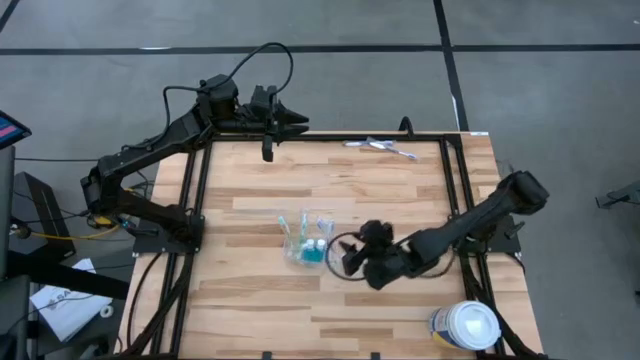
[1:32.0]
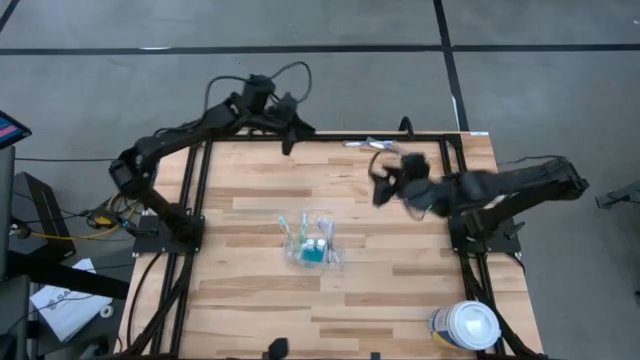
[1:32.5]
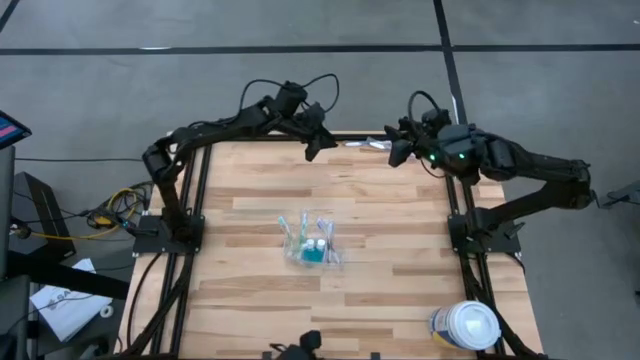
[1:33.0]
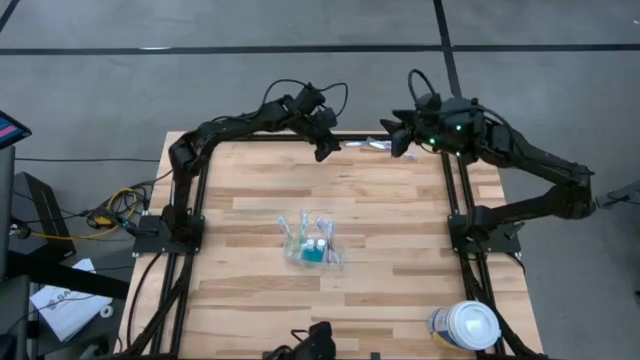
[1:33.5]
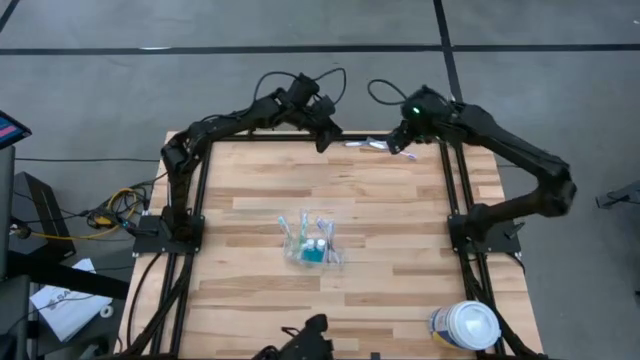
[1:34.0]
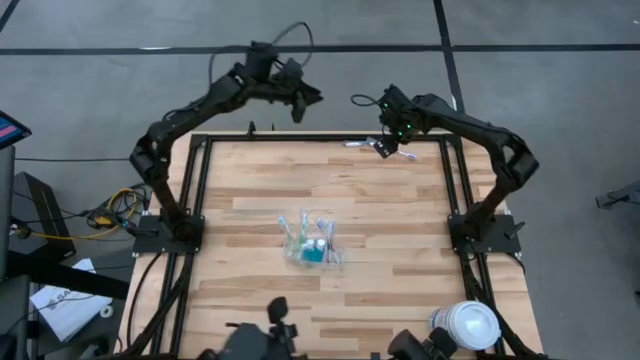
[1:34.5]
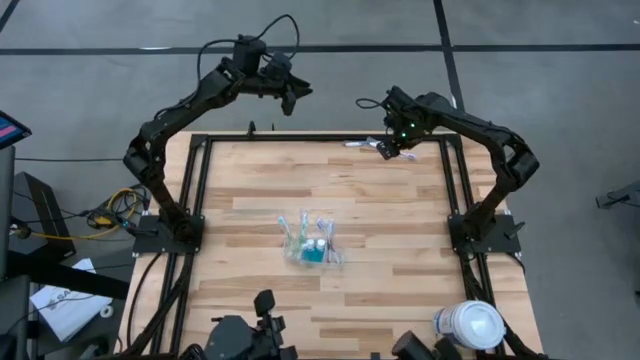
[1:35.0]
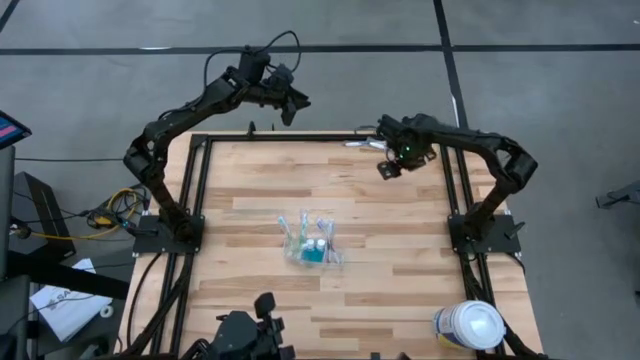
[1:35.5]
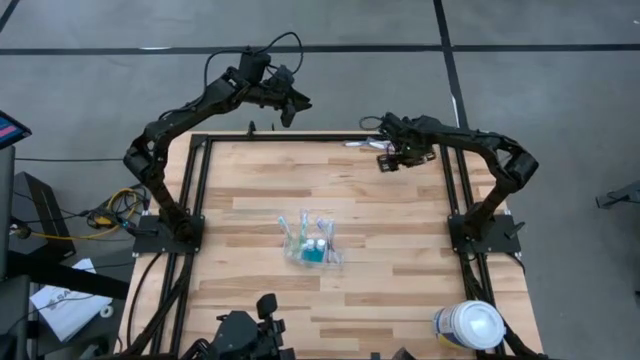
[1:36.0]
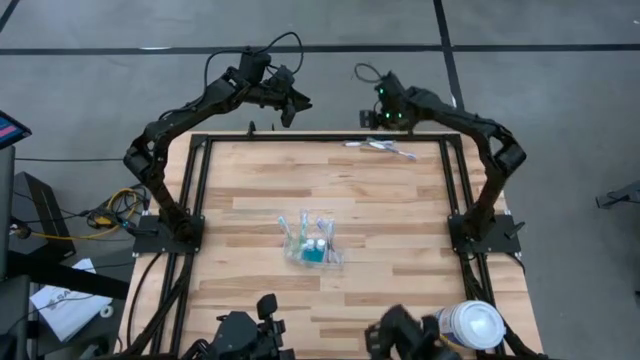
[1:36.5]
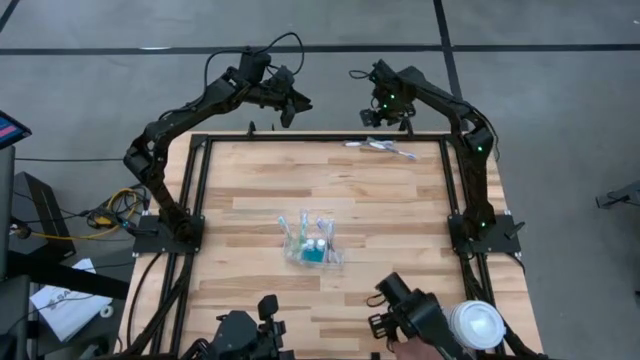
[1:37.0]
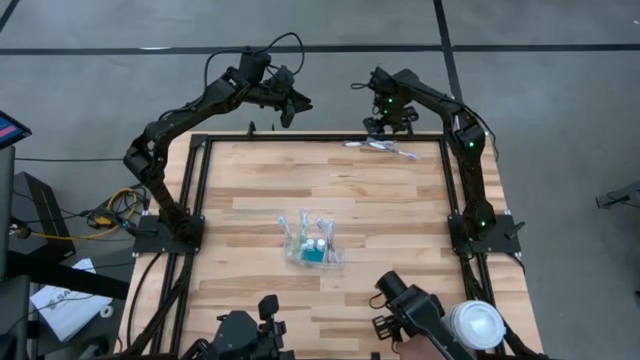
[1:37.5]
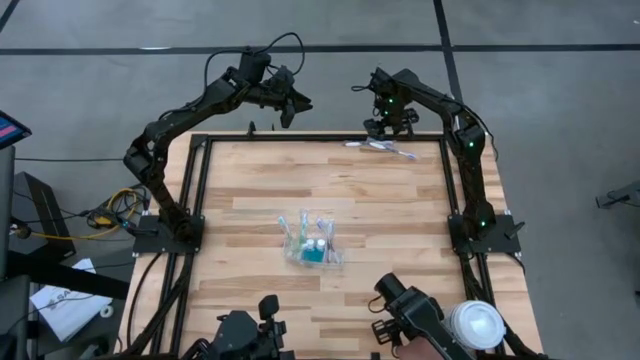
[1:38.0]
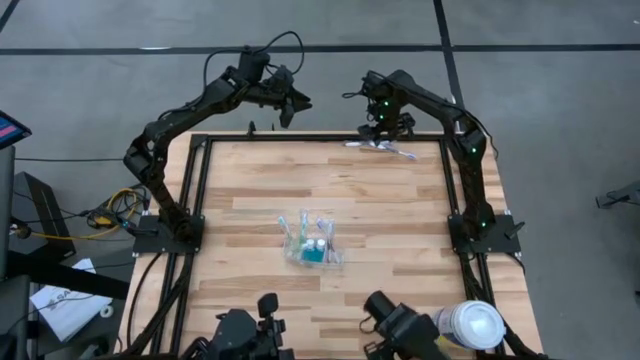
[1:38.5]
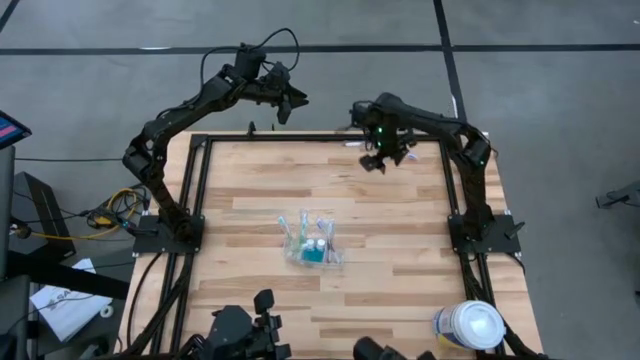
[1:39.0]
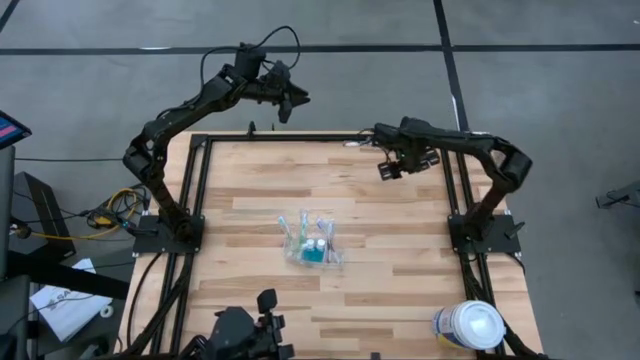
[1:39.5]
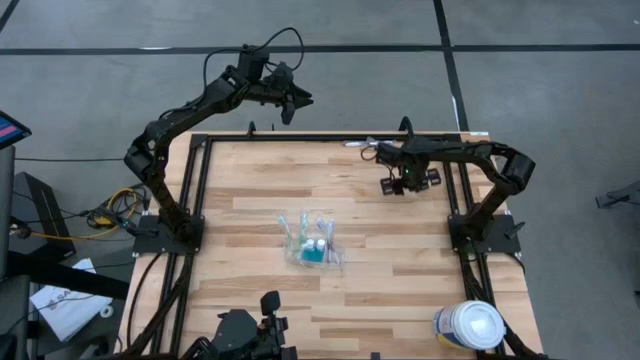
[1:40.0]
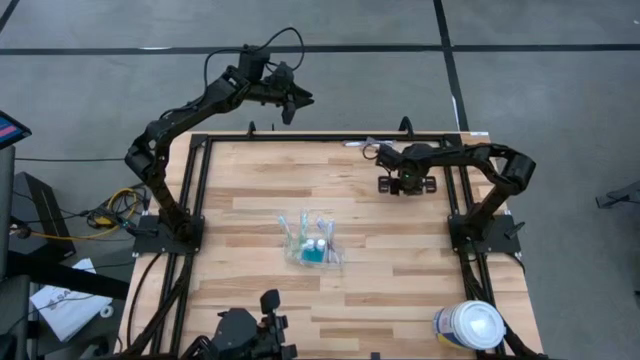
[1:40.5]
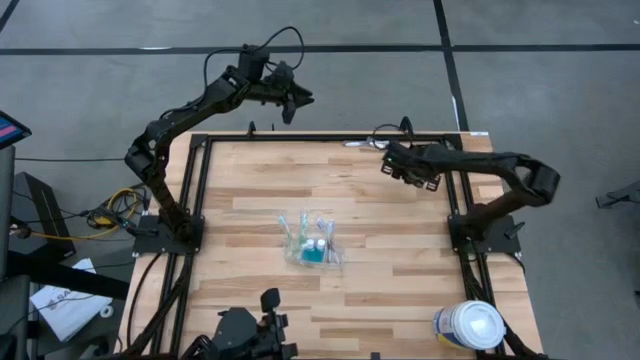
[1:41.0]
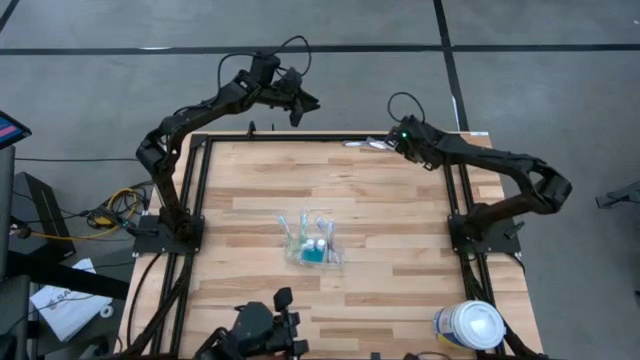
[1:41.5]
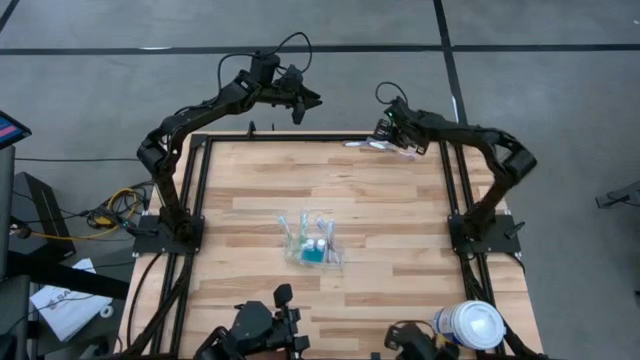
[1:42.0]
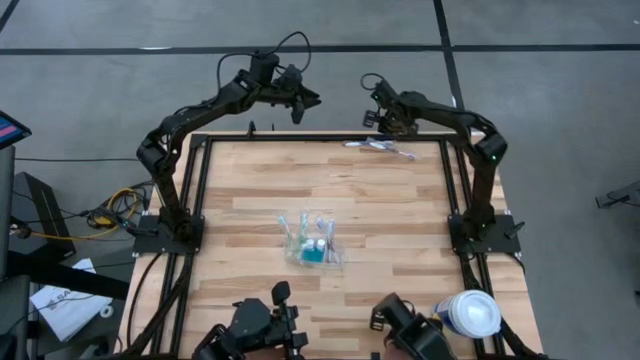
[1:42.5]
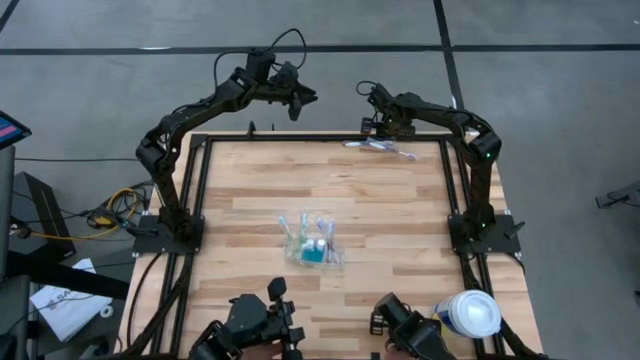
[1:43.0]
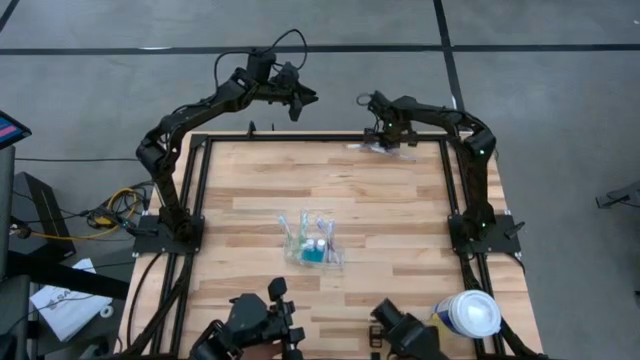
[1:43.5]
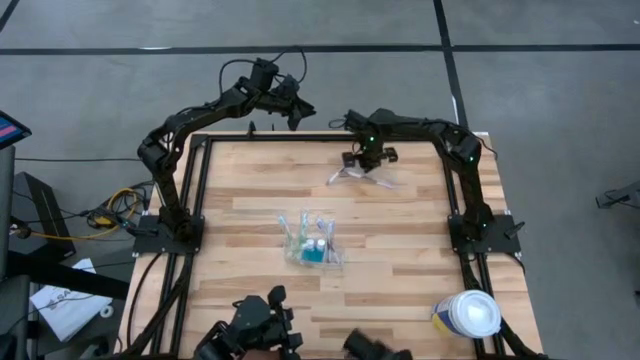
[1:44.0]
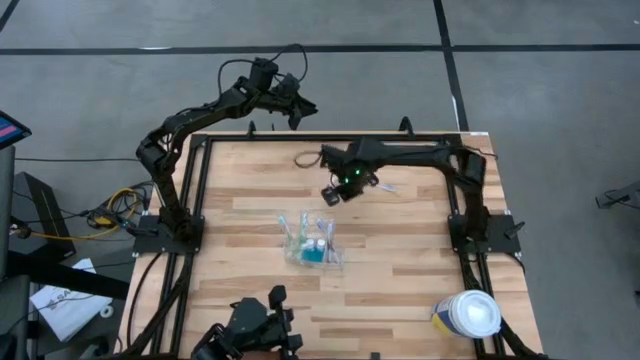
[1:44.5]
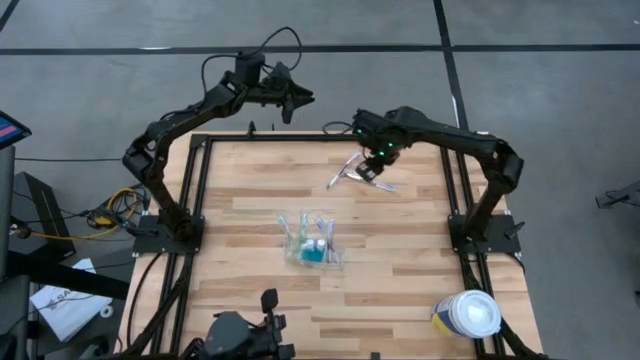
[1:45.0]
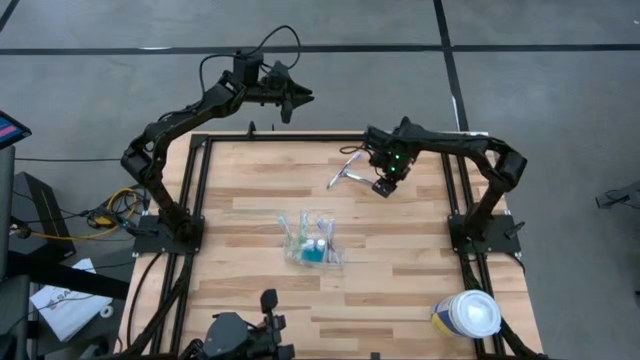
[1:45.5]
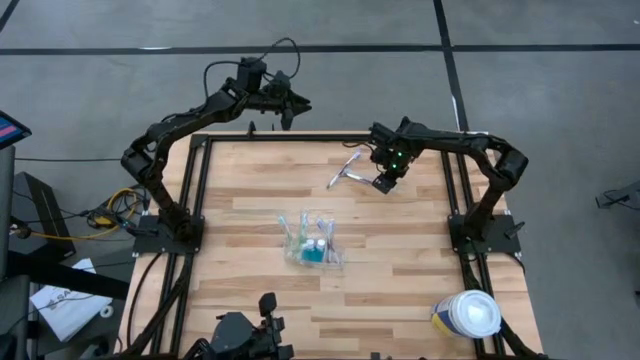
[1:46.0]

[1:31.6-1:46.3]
Task: Pick & Place toothbrushing station
Put the purple toothbrush into the transparent organizer

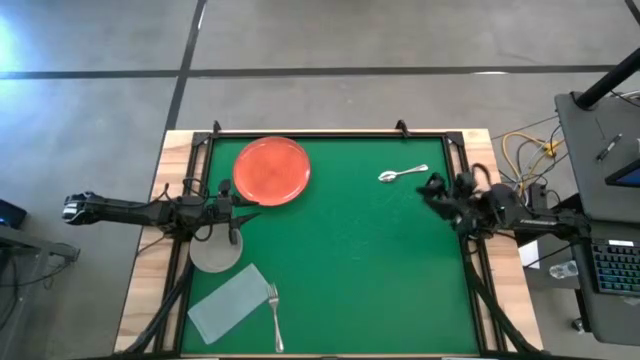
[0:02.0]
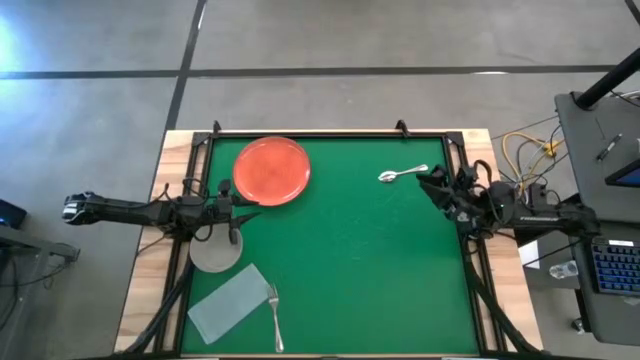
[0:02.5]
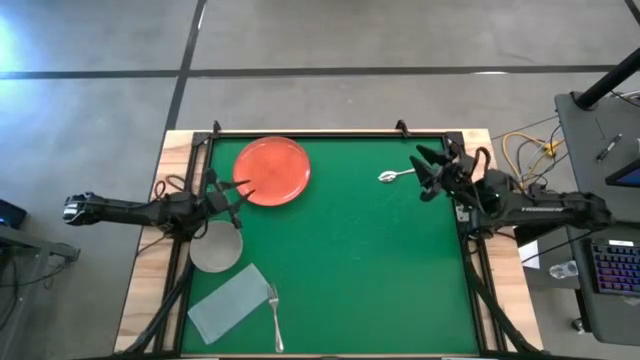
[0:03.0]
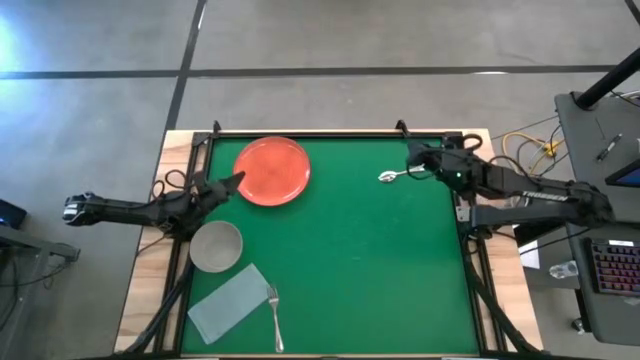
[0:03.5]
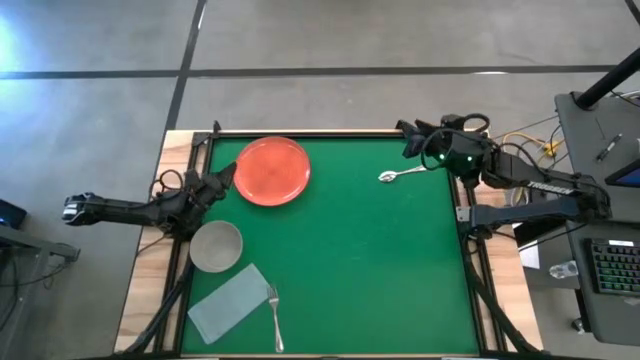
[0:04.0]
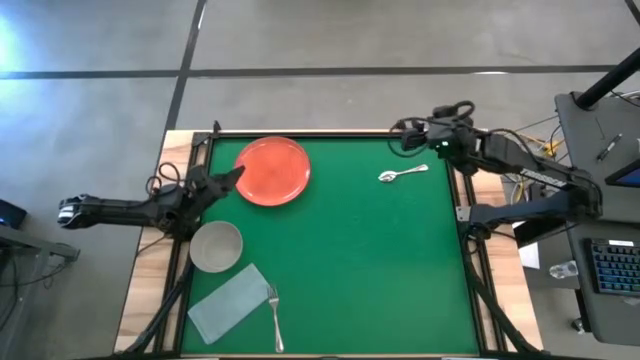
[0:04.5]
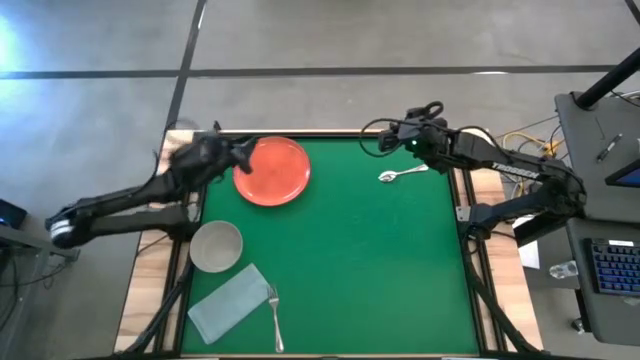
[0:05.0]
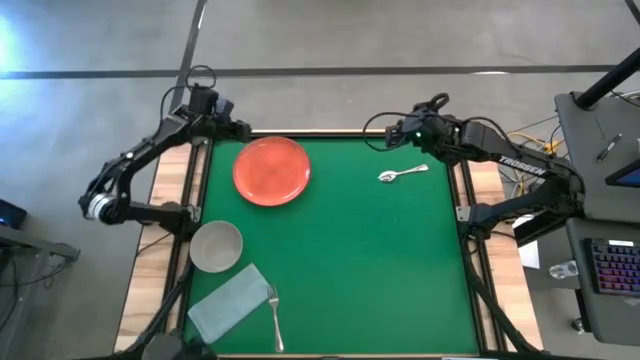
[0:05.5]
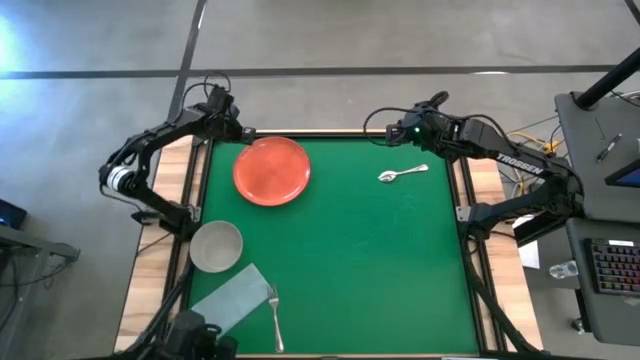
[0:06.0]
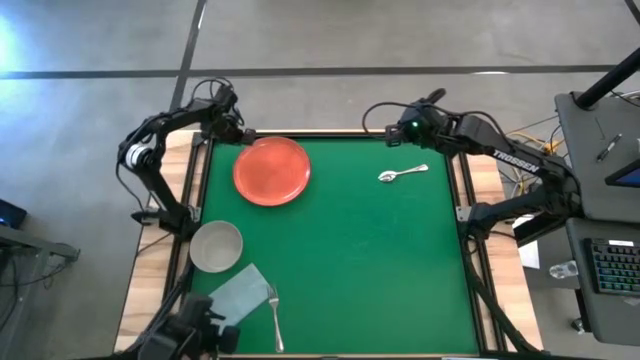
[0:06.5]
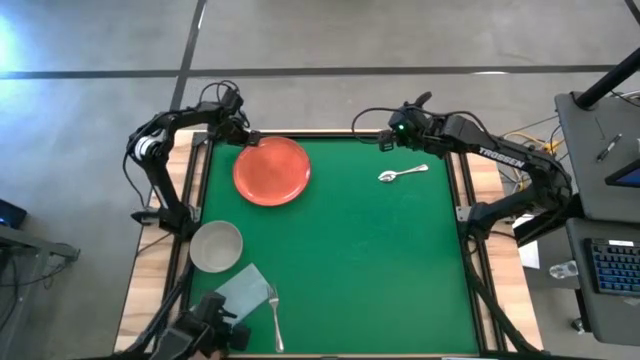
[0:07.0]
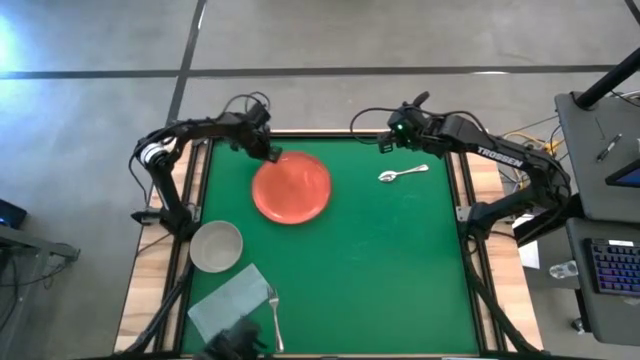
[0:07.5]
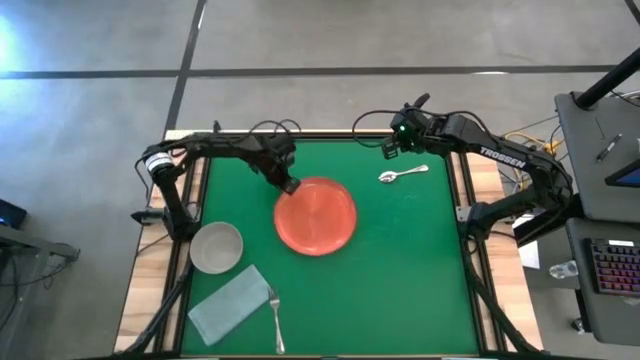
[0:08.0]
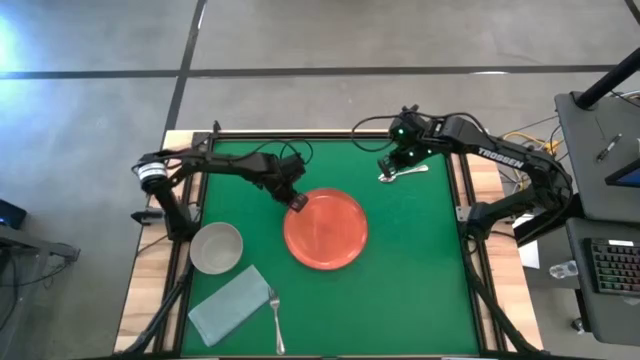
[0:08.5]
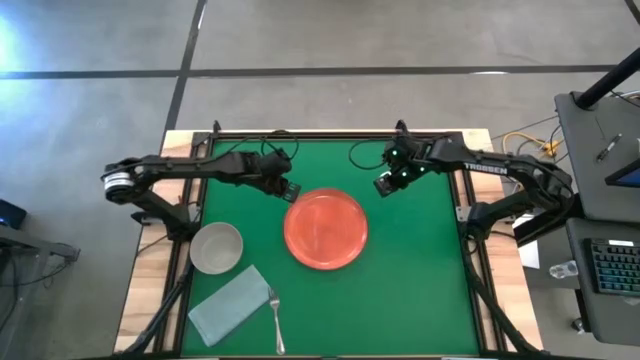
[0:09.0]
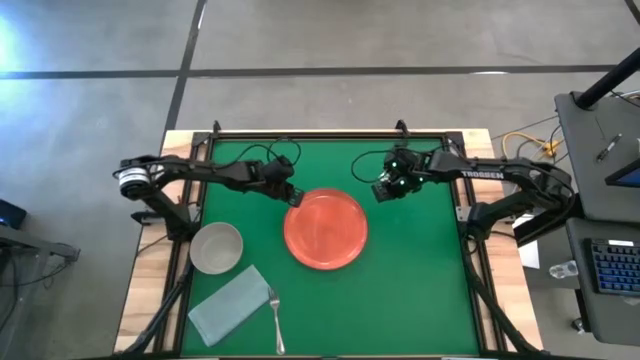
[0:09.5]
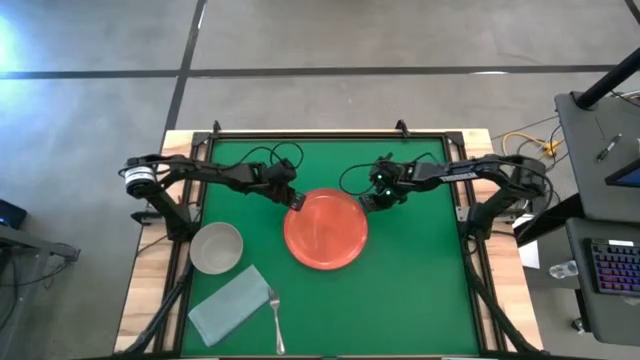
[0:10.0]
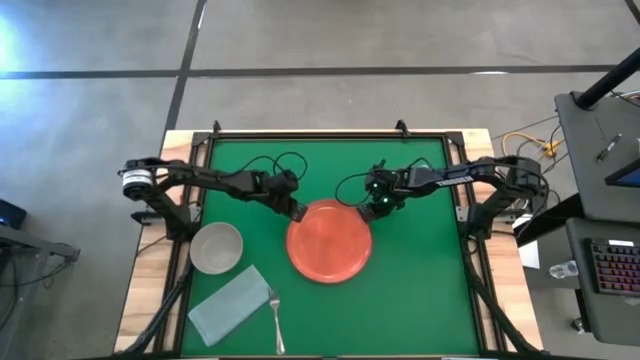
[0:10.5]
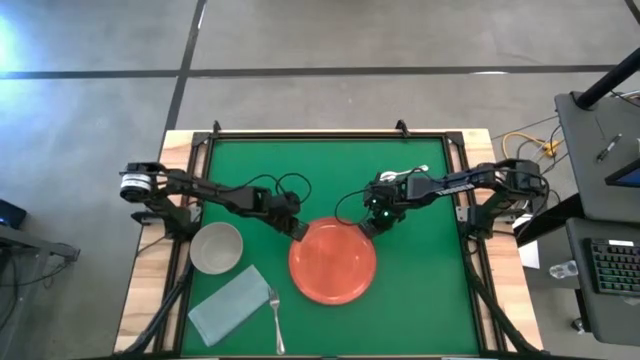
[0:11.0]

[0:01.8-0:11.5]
Task: Set table place
Move the orange plate to the middle of the table
